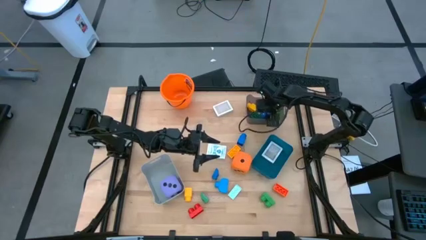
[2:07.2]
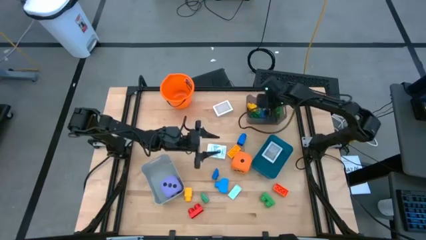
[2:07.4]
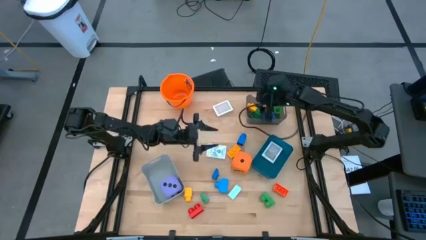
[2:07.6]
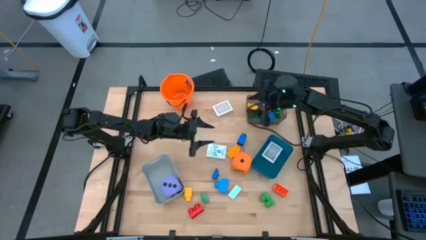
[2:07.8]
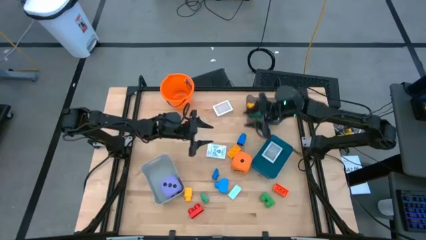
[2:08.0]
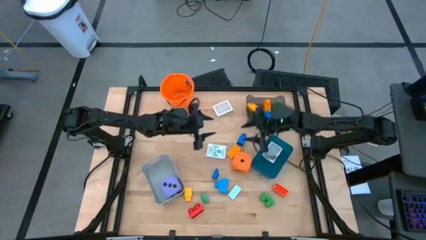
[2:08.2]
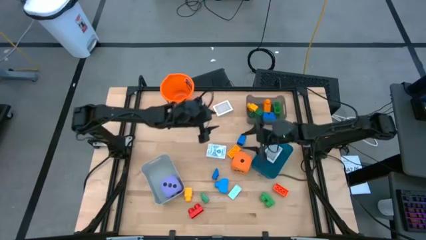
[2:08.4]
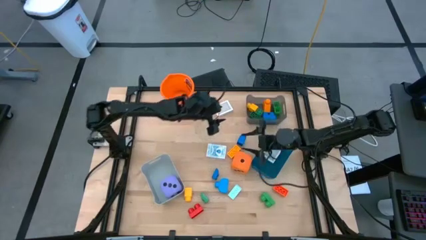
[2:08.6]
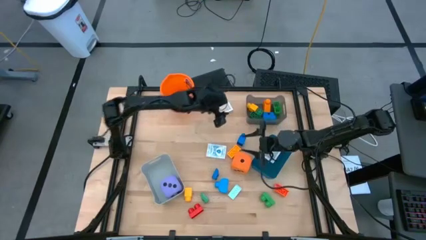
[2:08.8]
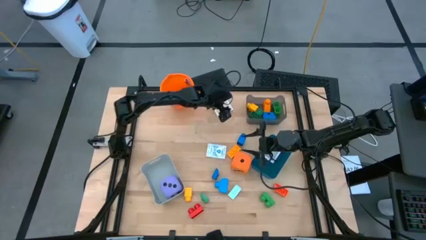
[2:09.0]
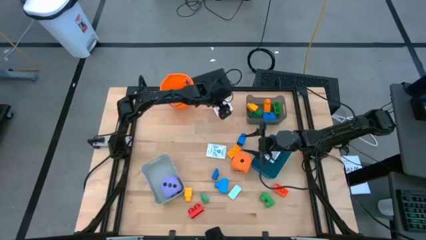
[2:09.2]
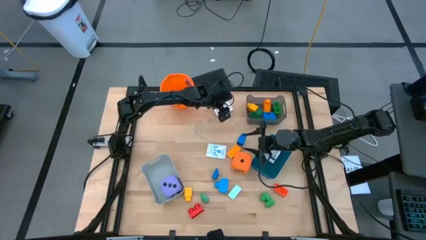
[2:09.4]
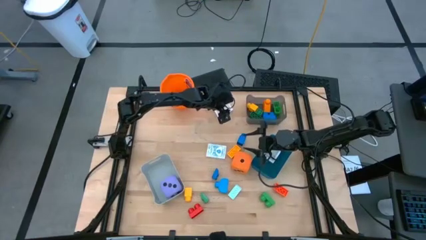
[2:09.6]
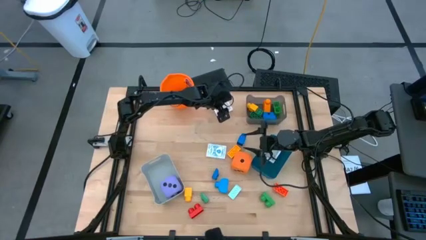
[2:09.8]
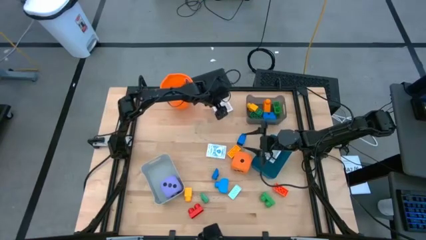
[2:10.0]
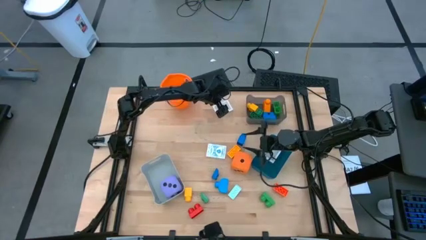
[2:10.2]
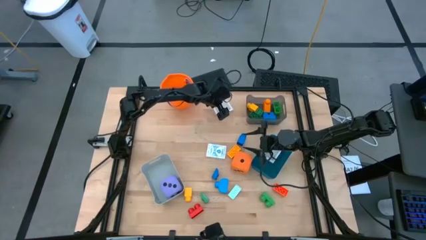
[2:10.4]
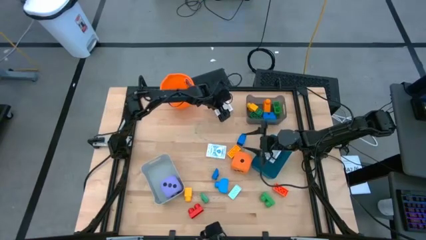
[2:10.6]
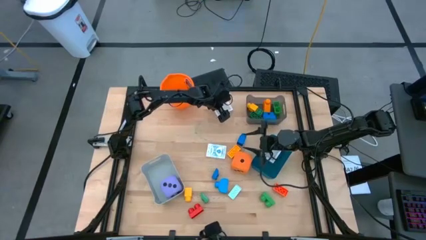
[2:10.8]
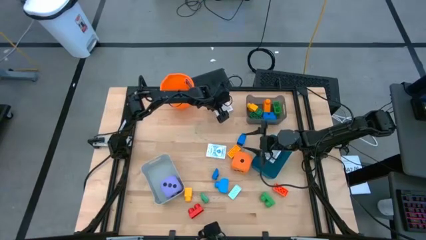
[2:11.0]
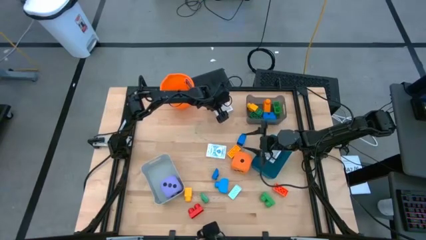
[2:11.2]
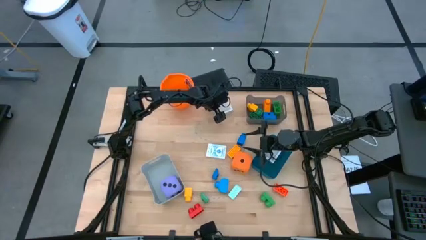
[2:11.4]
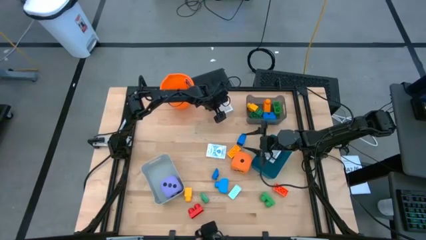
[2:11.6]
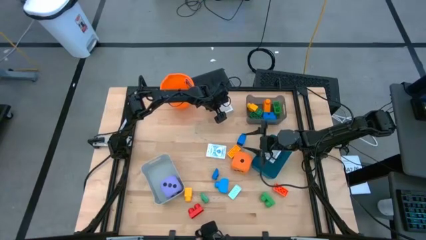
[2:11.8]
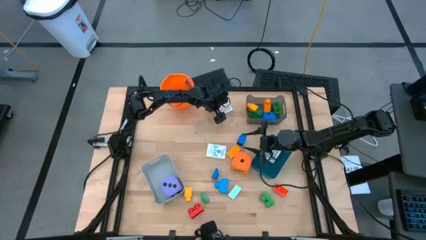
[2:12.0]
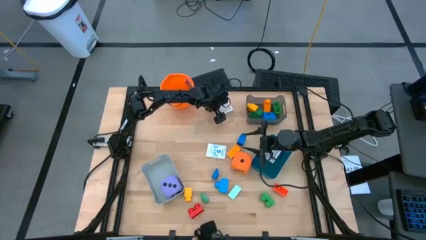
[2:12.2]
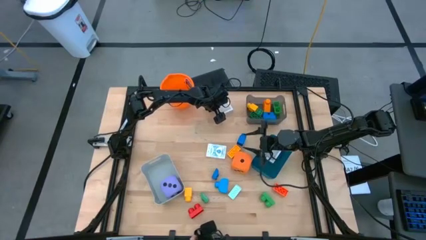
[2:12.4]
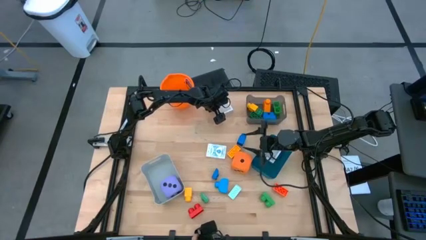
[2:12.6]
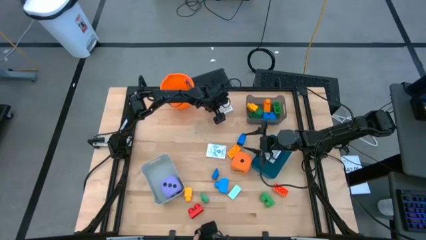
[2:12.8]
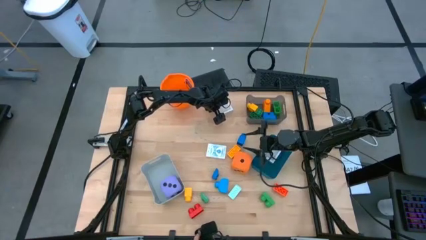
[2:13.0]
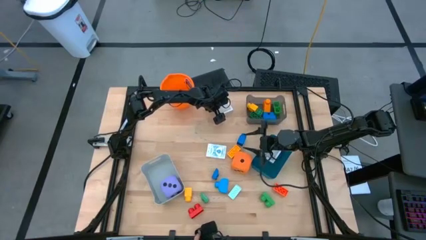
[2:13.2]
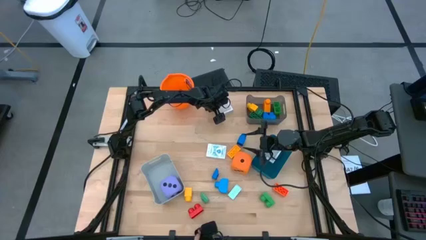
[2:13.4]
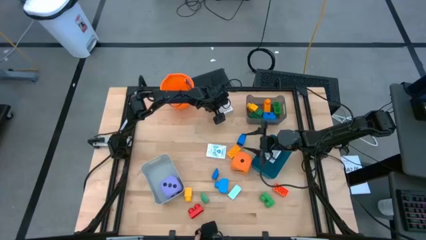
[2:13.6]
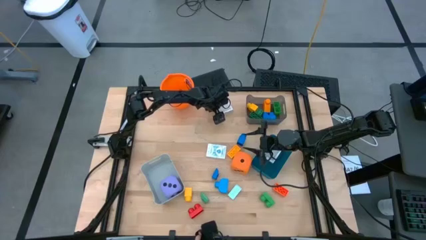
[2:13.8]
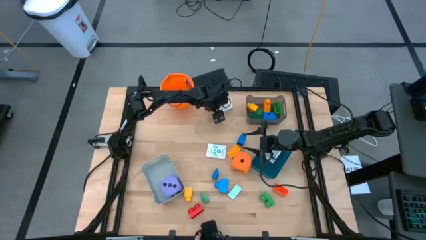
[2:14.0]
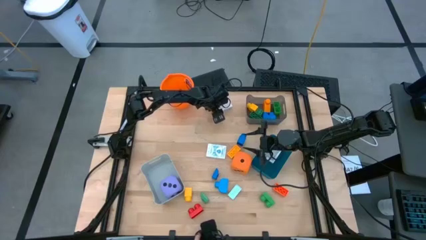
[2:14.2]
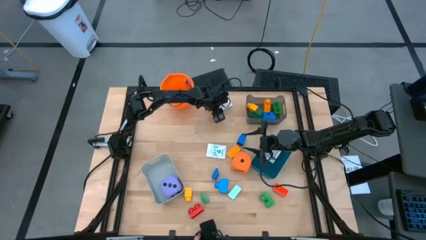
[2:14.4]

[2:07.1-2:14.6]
Task: Pick & Place Toys
Put the brown deck of cards into the blue bin
